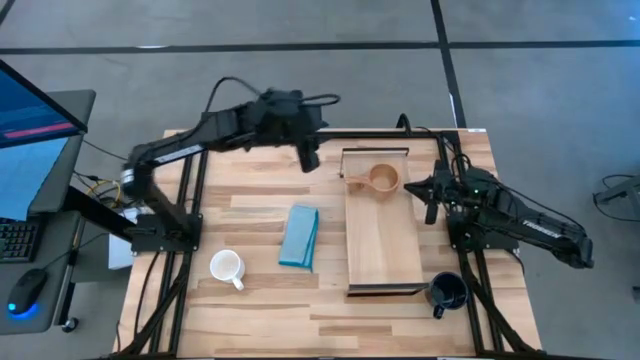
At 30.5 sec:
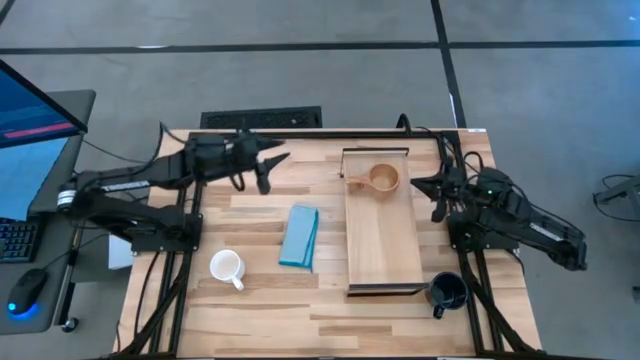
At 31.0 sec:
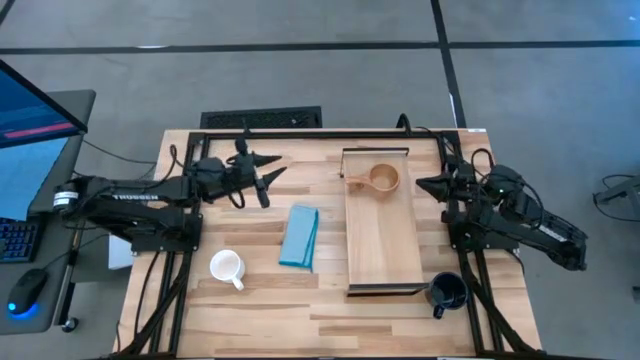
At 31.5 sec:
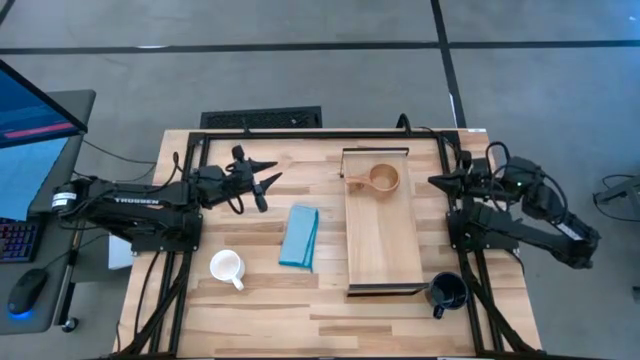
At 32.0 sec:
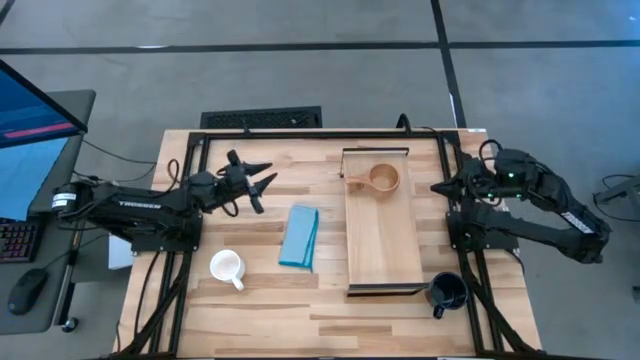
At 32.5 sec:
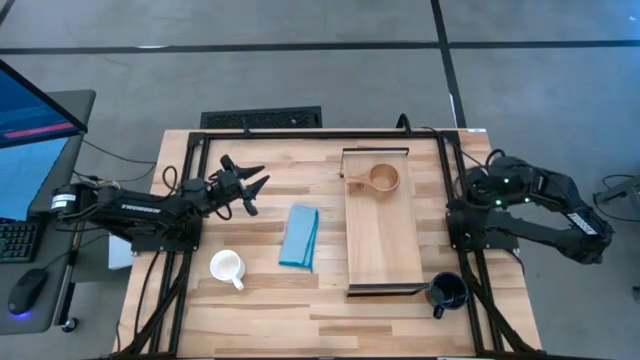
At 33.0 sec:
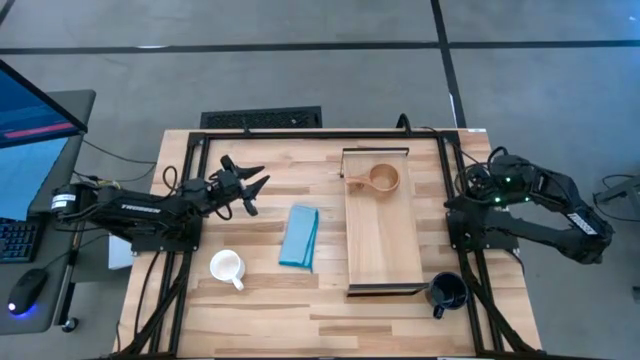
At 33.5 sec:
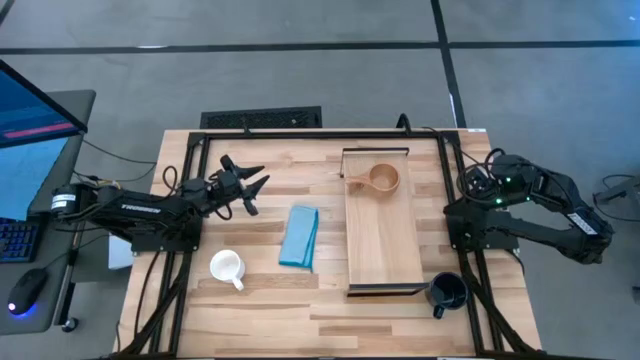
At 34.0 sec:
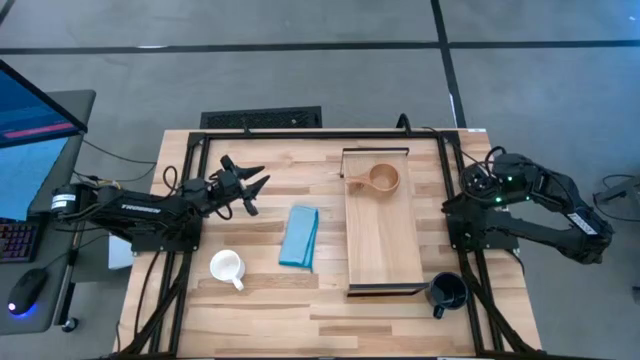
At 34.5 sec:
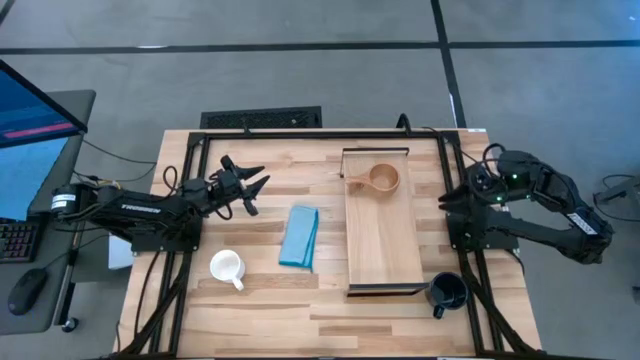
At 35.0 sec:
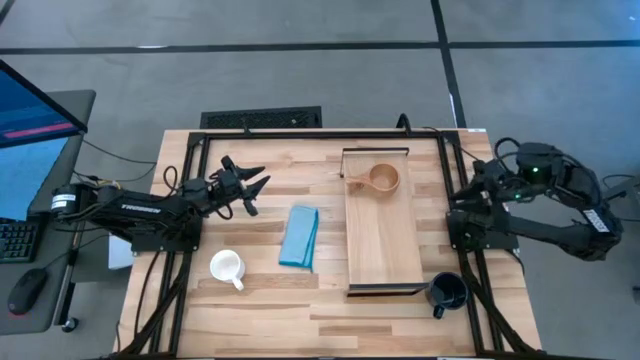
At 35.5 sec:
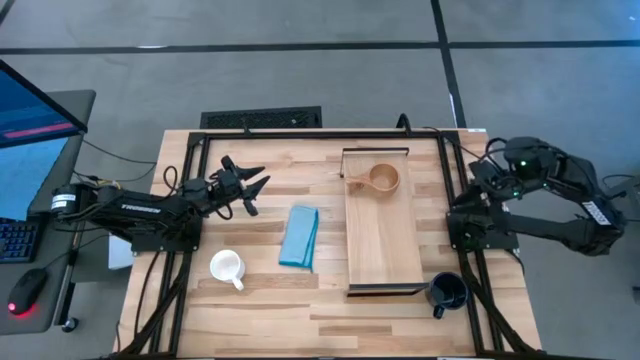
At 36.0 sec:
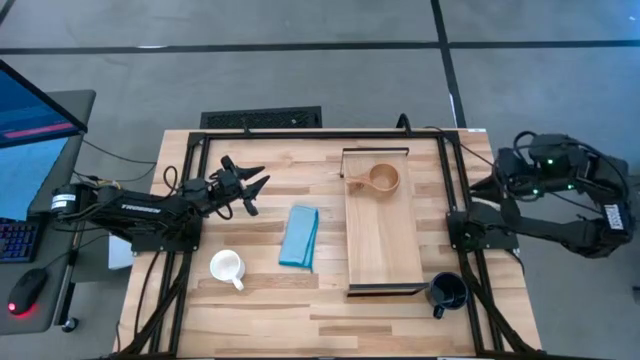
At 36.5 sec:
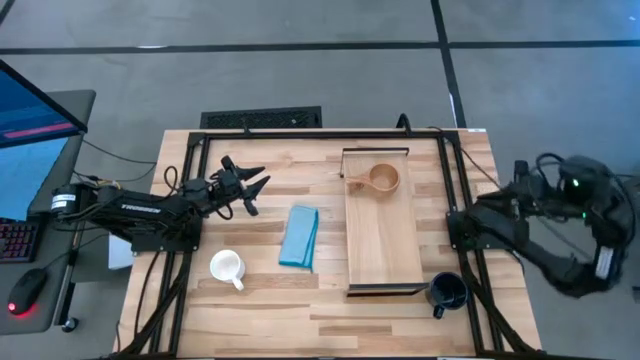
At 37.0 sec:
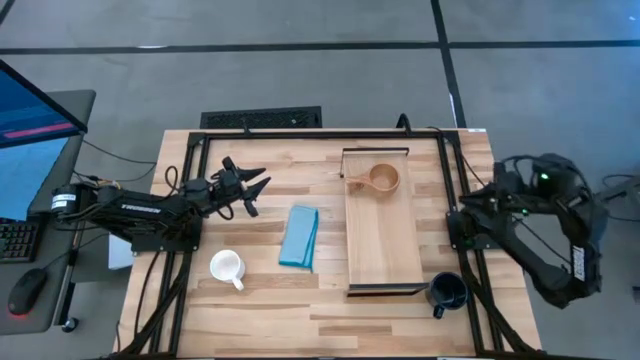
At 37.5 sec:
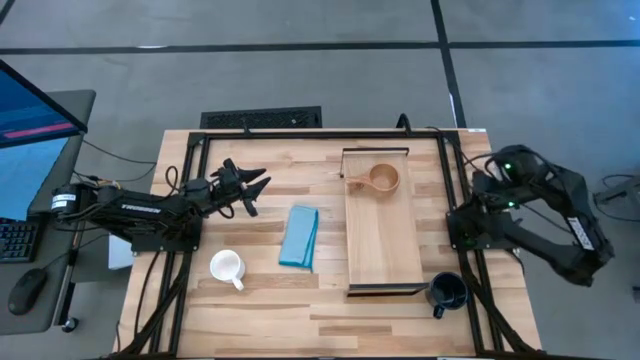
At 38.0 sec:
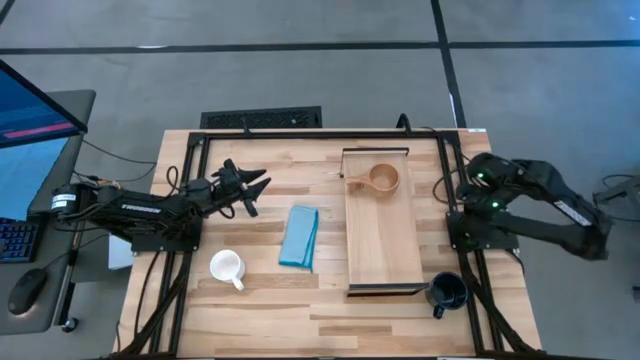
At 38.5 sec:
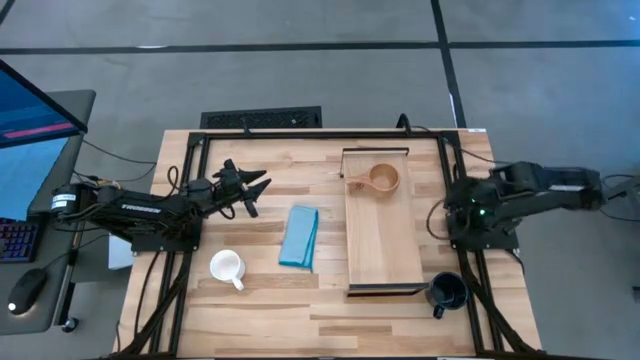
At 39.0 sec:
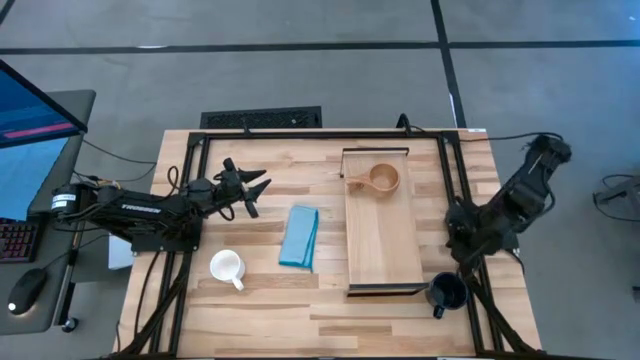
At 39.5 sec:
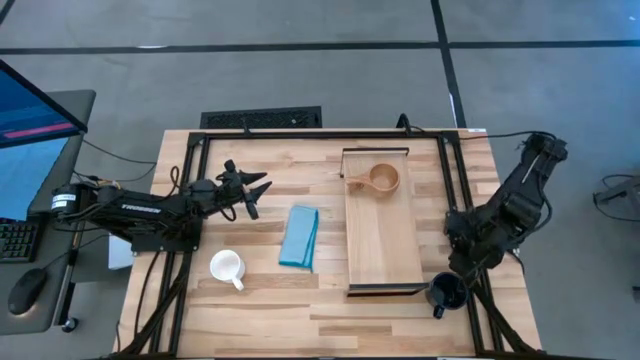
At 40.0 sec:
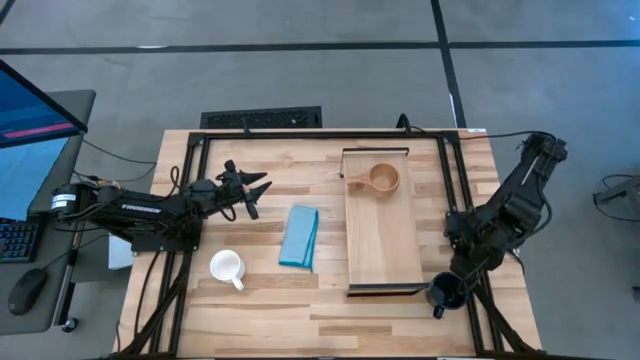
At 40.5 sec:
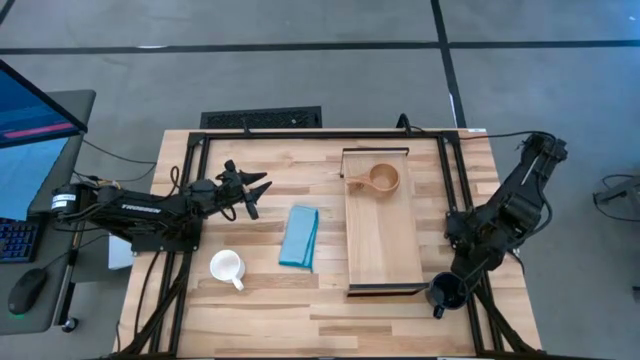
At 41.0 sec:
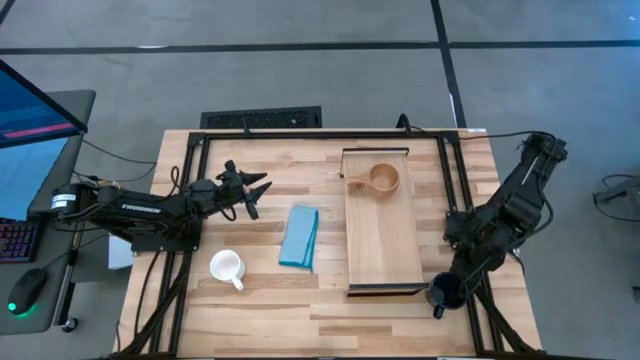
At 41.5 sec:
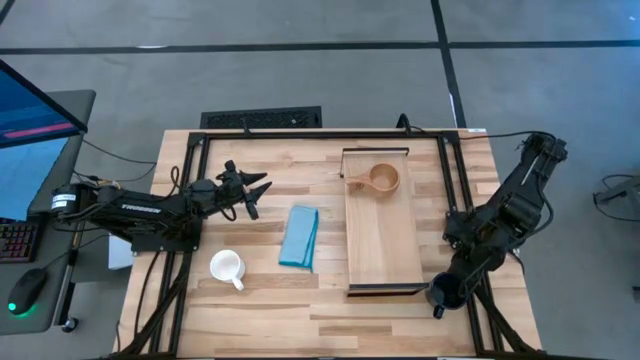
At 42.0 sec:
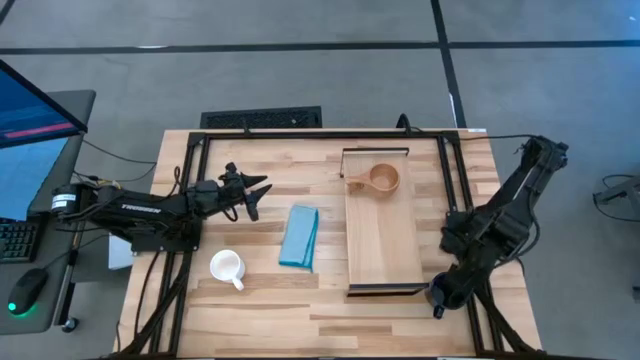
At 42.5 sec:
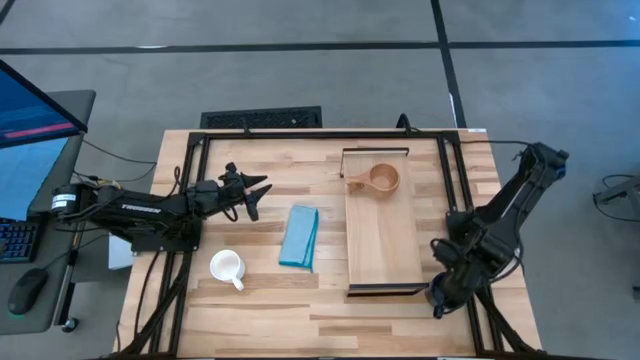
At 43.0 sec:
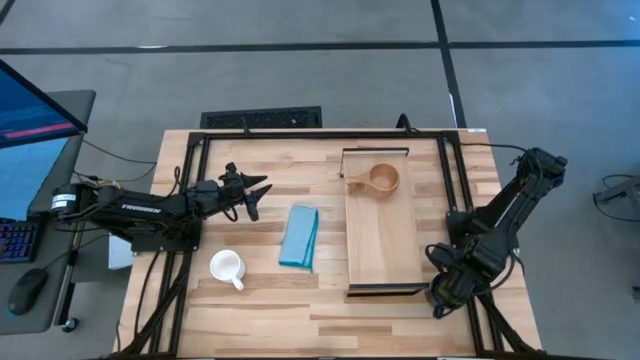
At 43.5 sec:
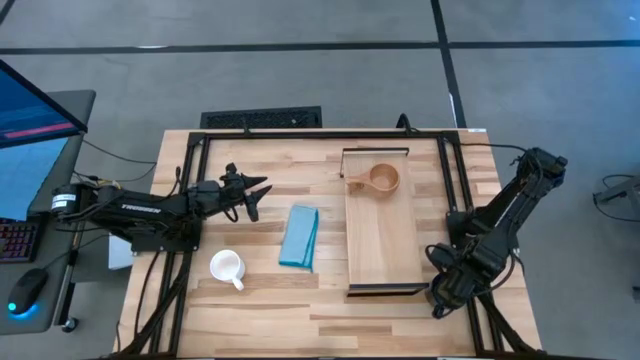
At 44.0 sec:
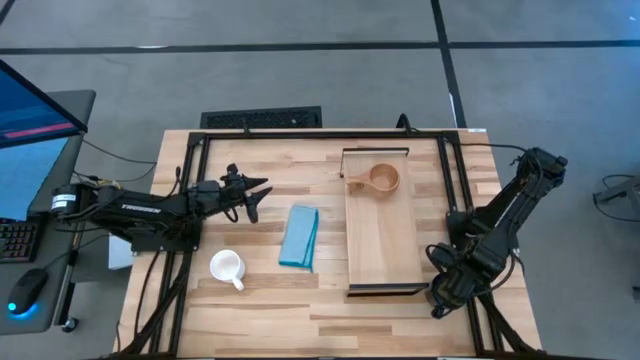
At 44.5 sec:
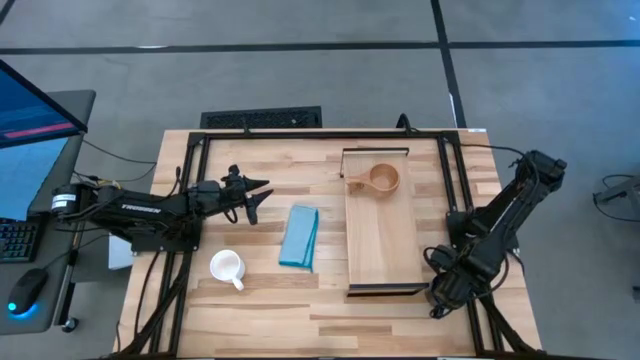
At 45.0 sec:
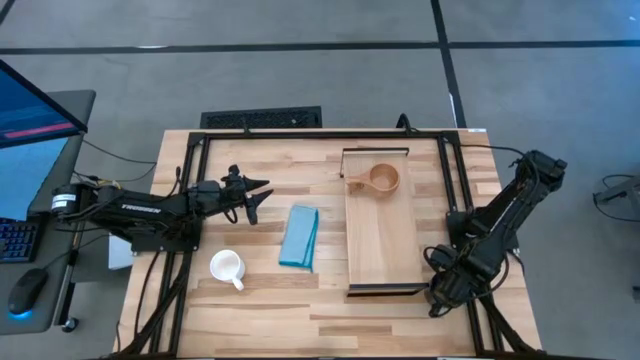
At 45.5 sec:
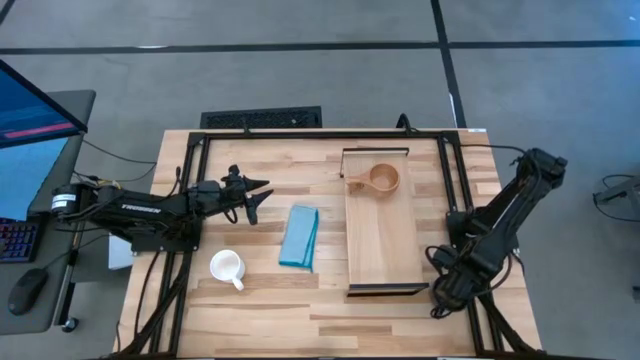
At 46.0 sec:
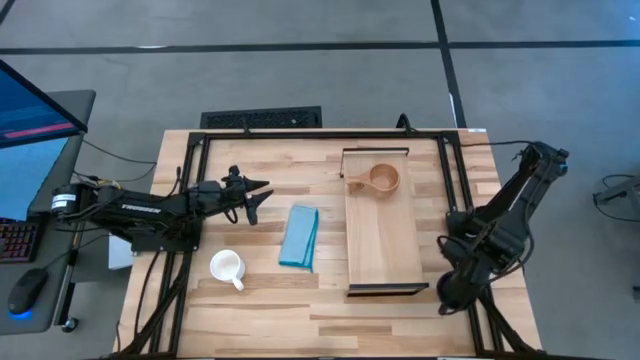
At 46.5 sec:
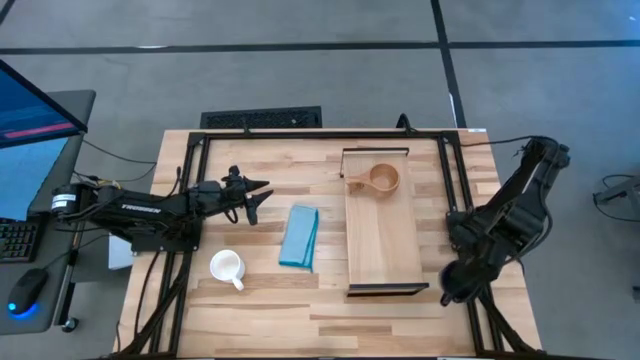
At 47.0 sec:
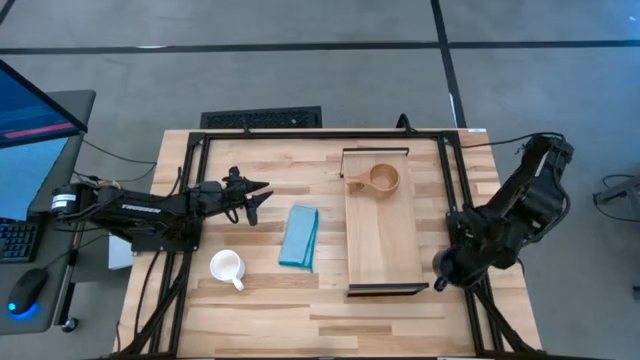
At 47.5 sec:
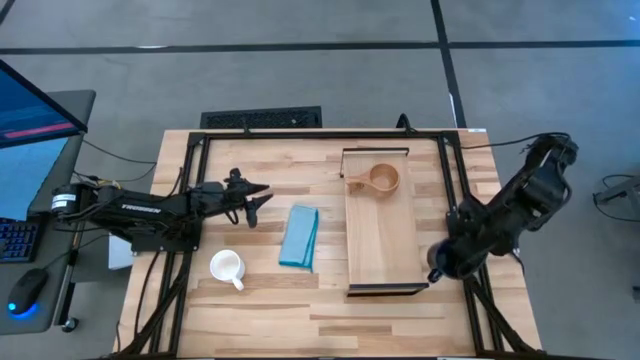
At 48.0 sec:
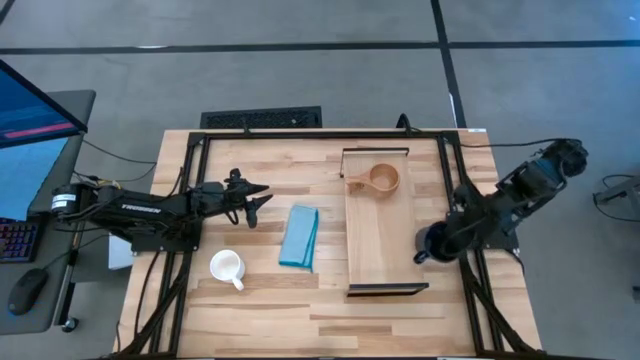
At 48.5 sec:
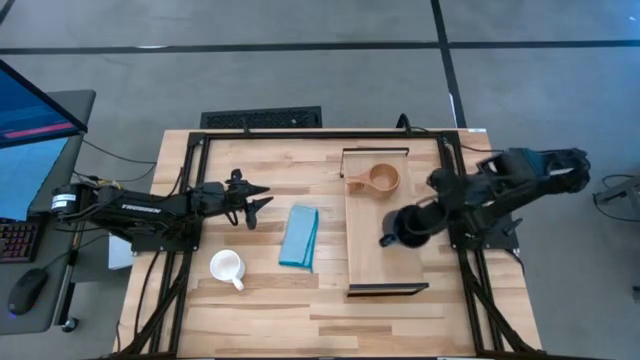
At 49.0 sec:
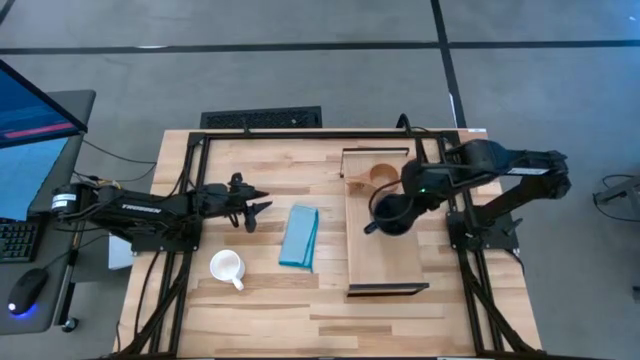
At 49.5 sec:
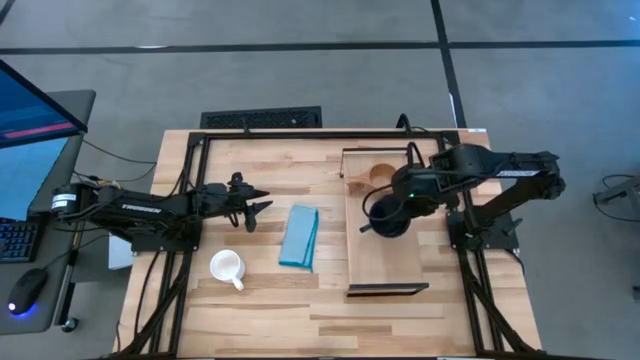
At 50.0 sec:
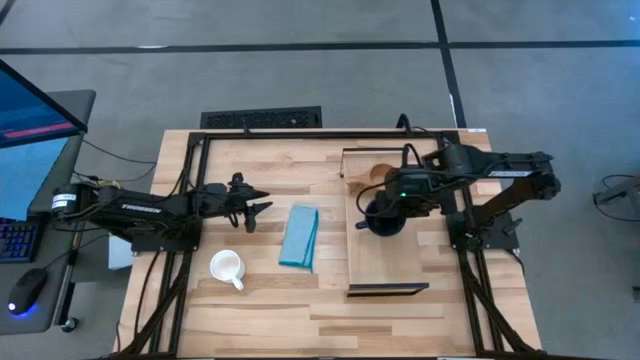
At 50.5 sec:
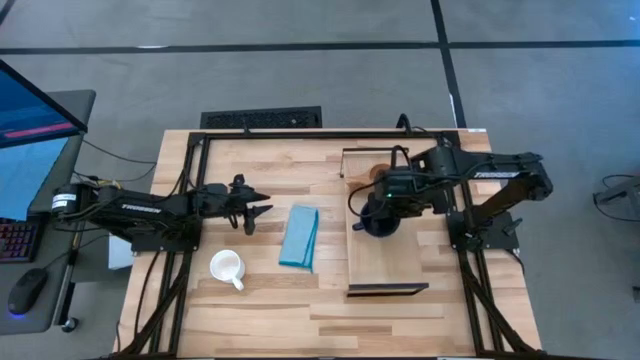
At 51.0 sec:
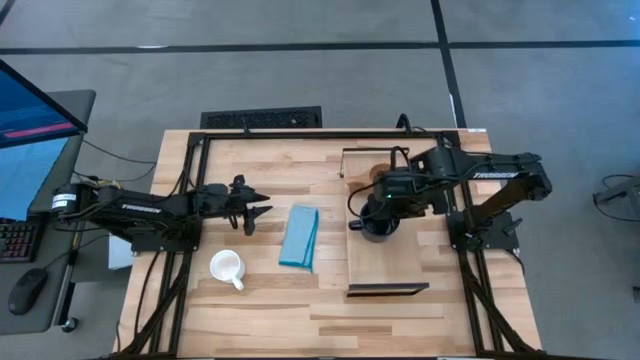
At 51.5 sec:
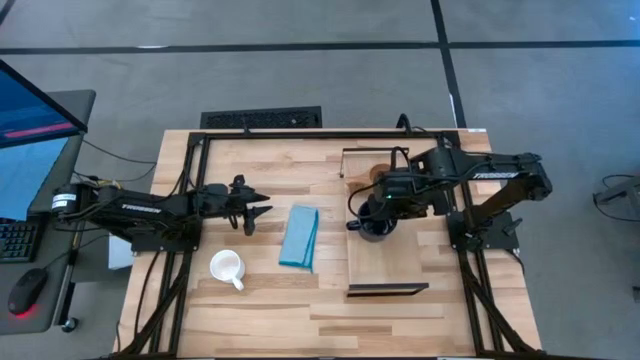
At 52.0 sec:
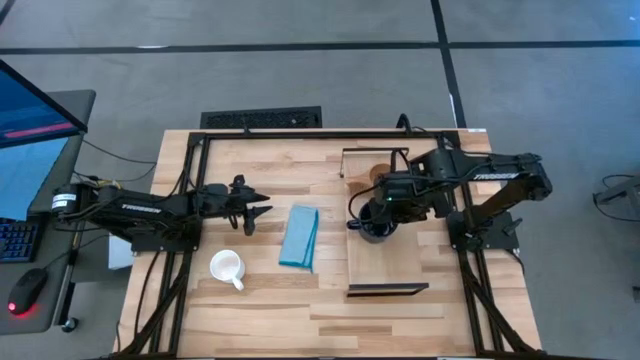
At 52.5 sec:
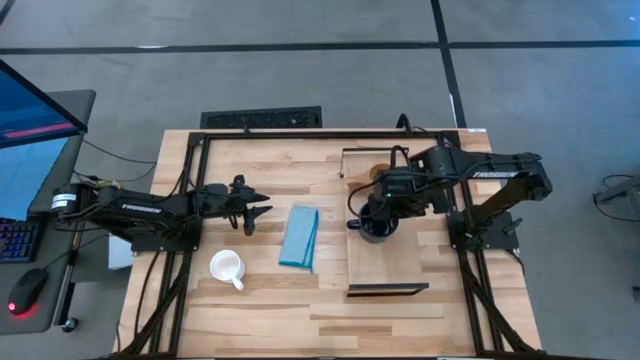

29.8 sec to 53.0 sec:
Task: Stack small to large cups/mugs on shelf
Put the black mug on the shelf
